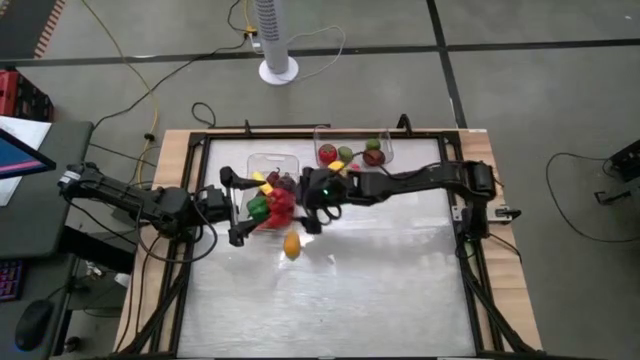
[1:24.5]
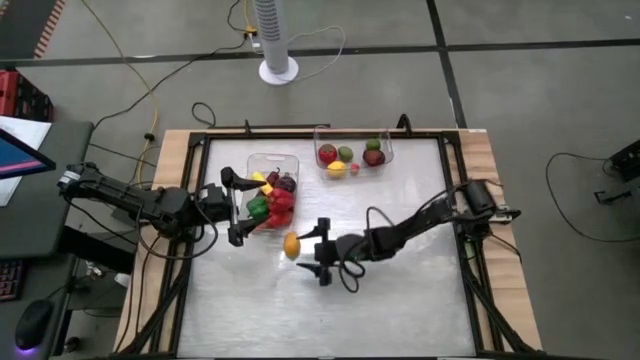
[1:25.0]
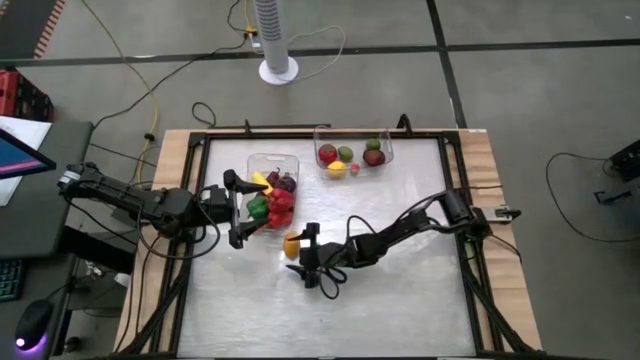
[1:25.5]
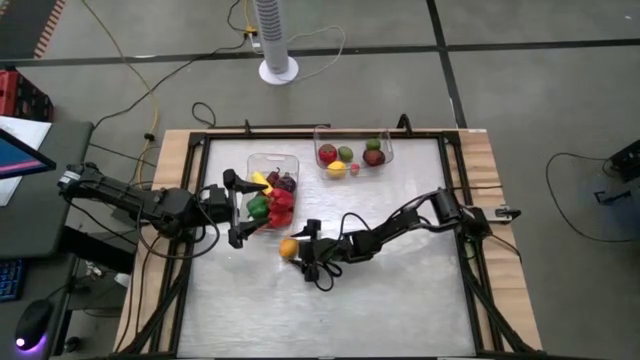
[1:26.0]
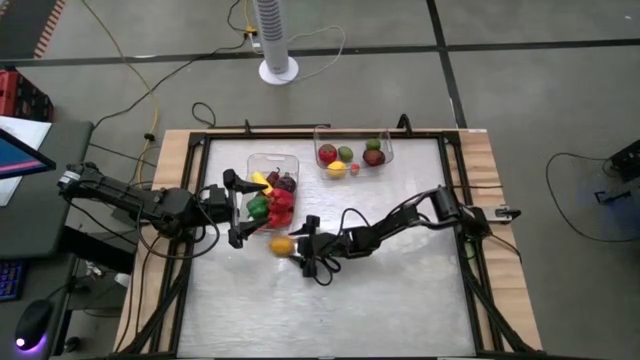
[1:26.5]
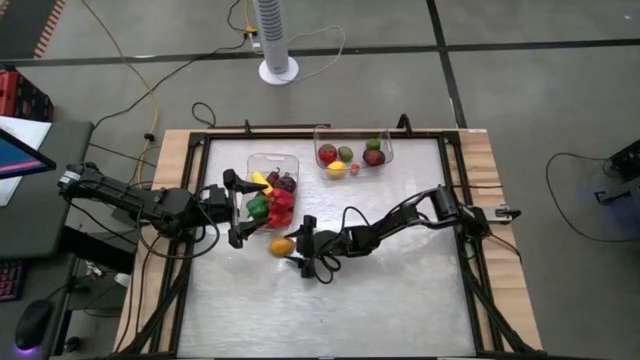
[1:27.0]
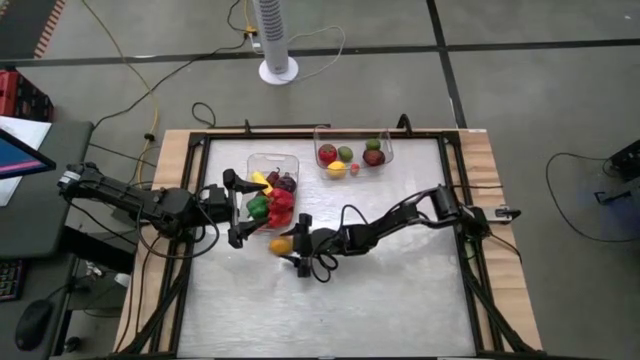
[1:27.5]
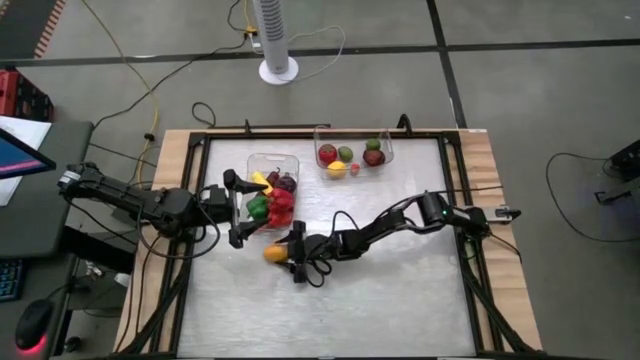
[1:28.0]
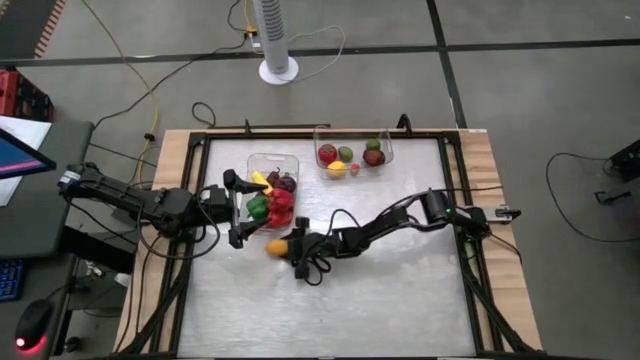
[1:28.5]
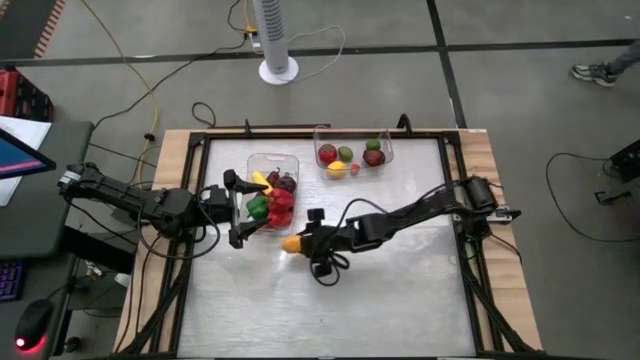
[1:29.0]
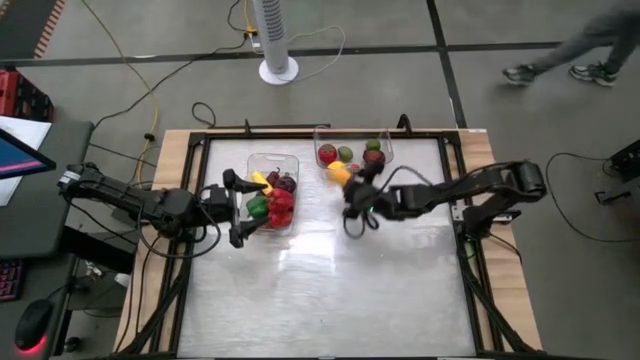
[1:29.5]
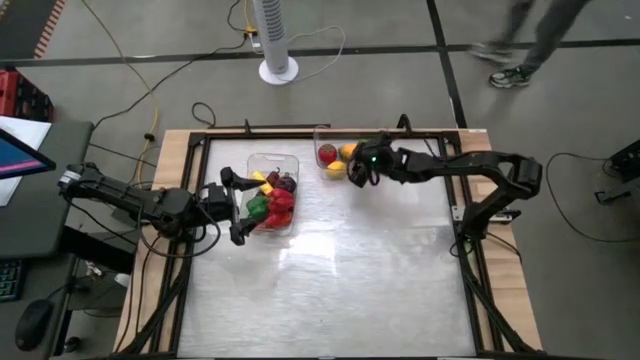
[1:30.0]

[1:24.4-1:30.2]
Task: Sort produce into baskets
Put the yellow lemon into the top transparent bin

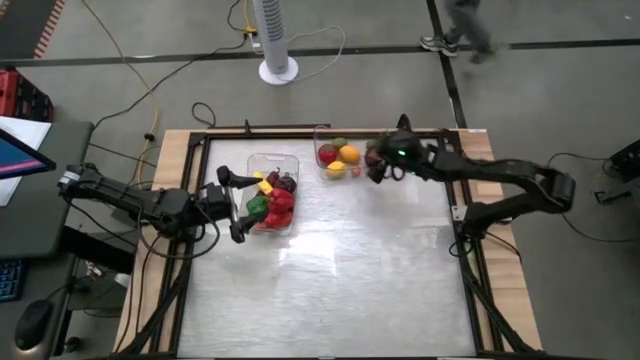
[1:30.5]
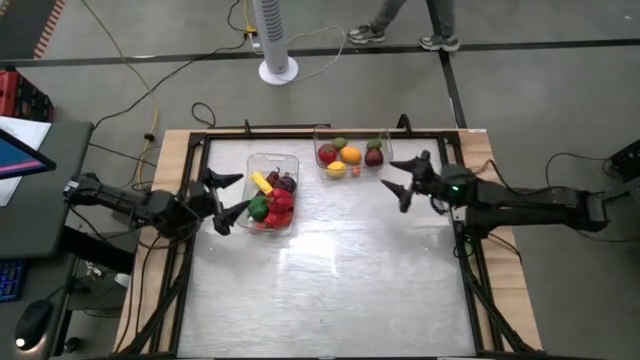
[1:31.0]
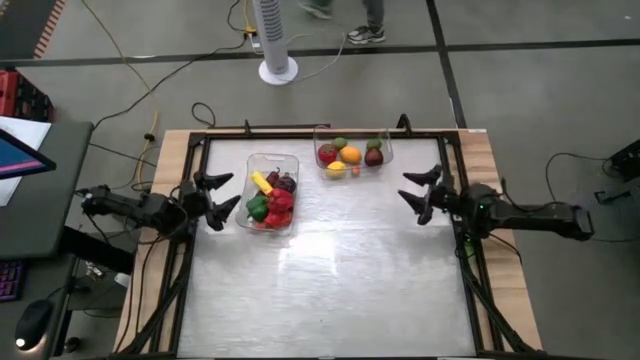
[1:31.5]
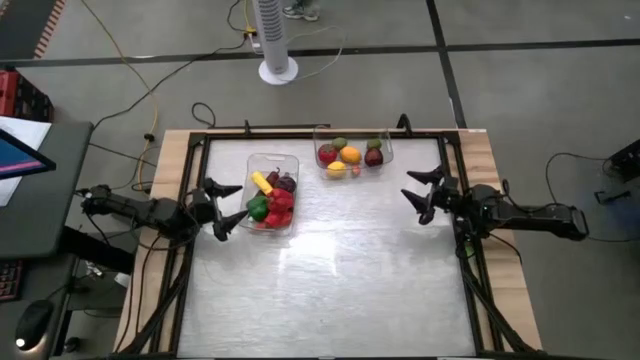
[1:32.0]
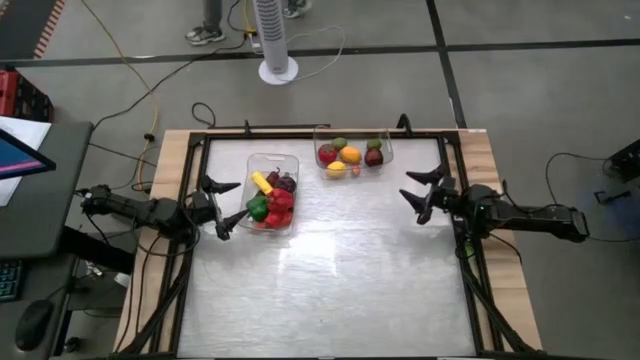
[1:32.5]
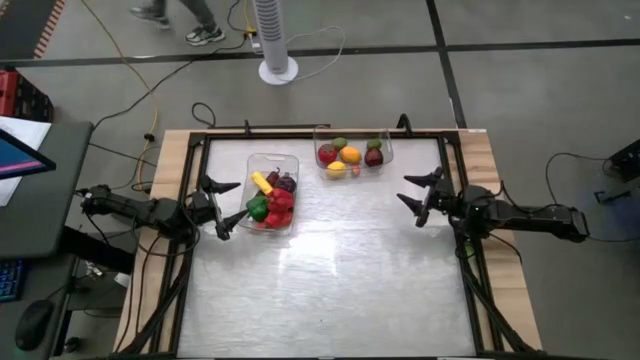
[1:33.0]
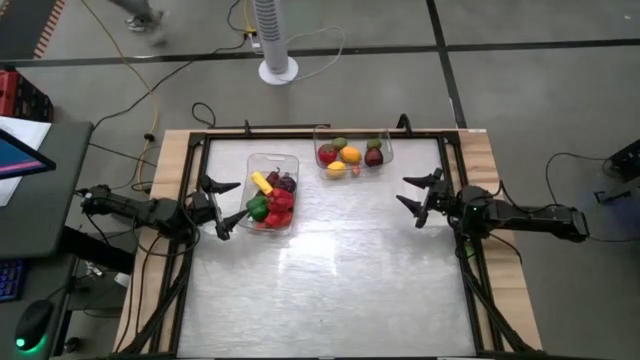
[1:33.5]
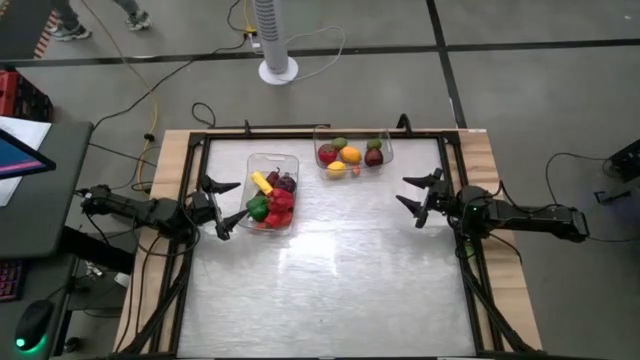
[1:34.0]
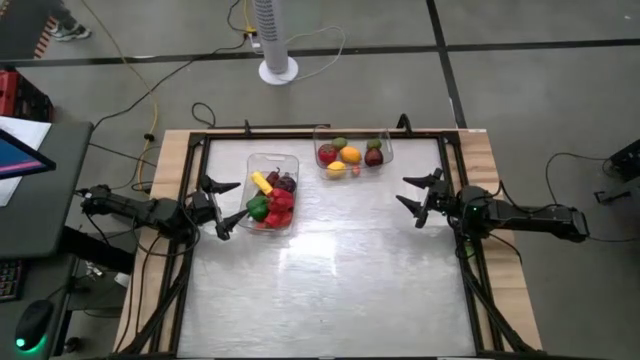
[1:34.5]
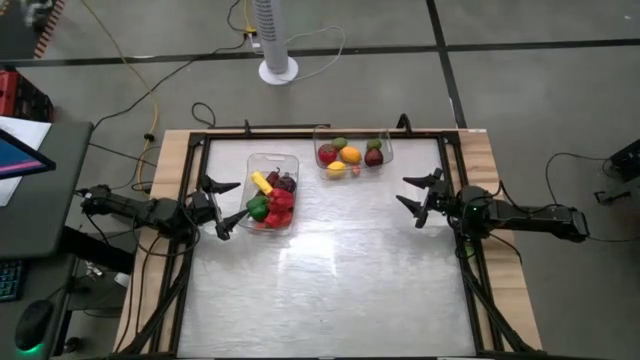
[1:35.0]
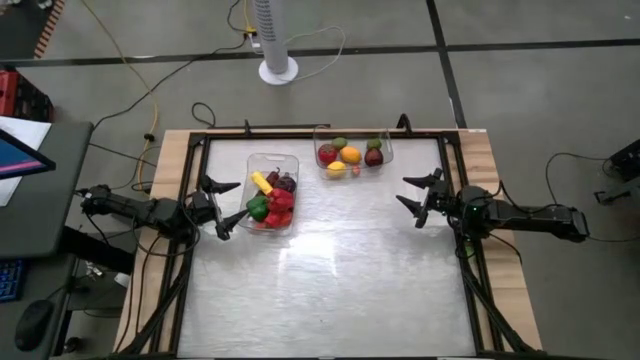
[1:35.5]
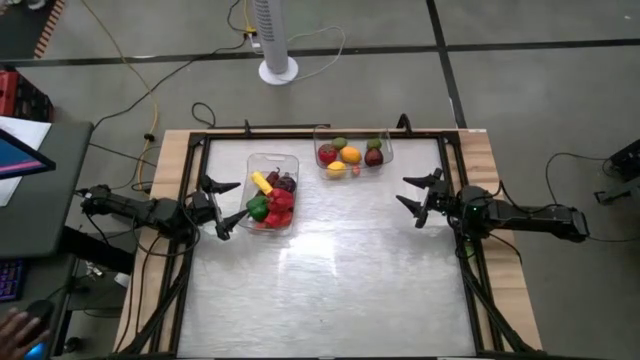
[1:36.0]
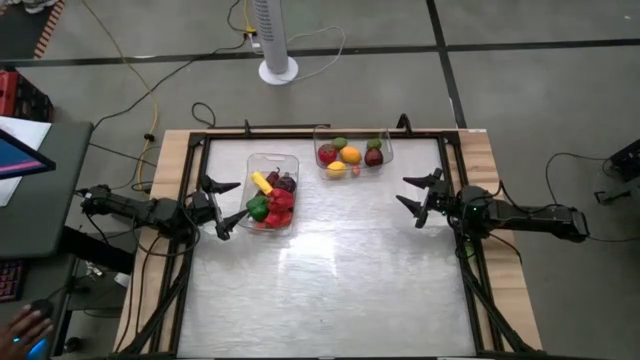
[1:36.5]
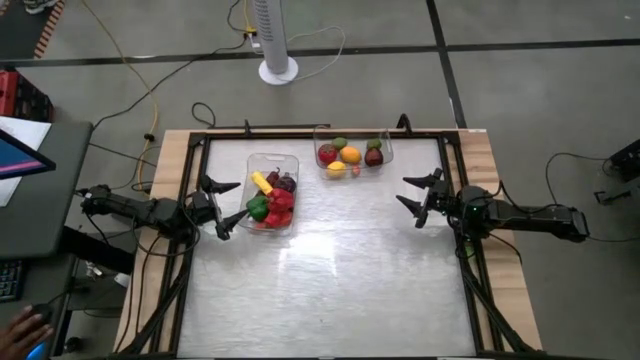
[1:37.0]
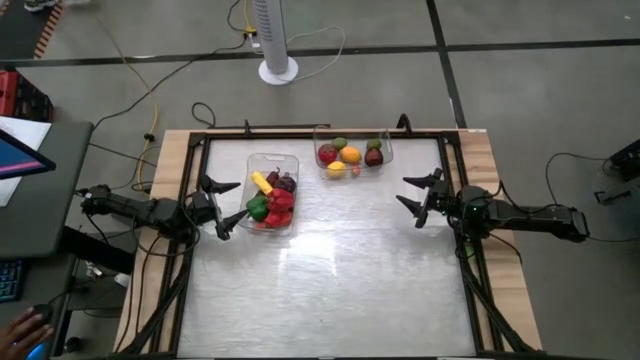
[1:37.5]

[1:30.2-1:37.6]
Return to Home Position

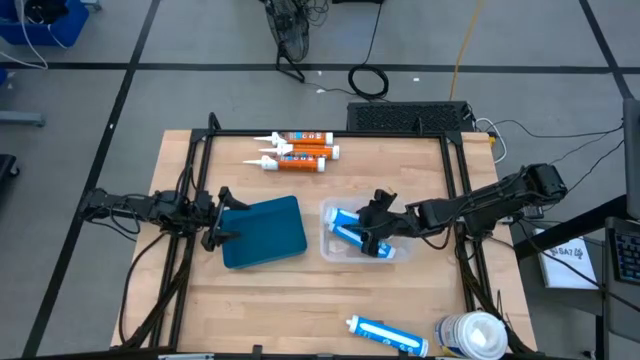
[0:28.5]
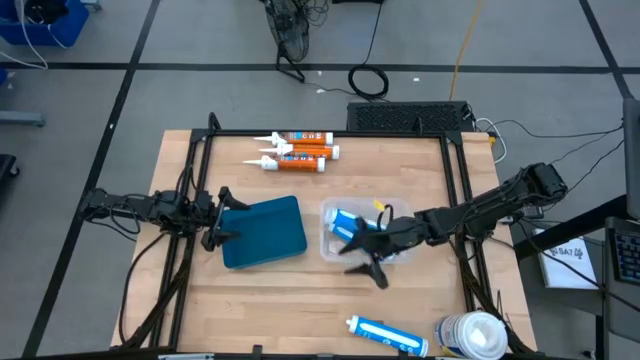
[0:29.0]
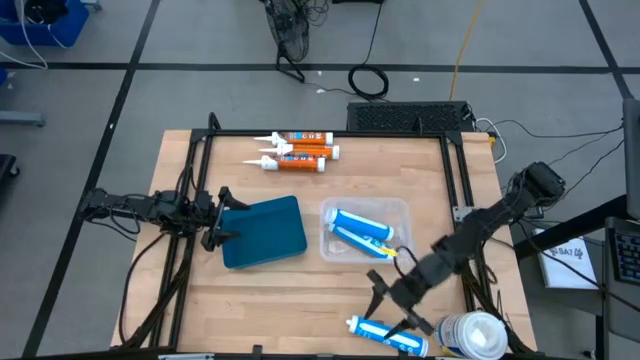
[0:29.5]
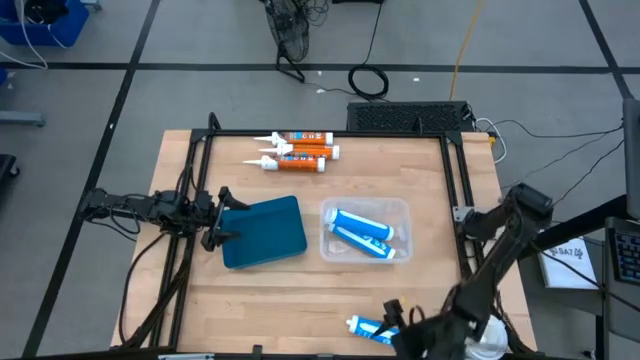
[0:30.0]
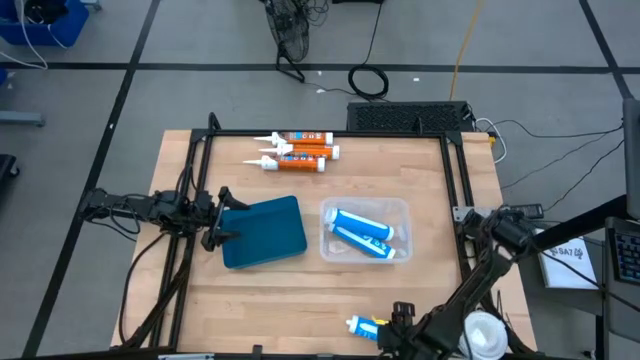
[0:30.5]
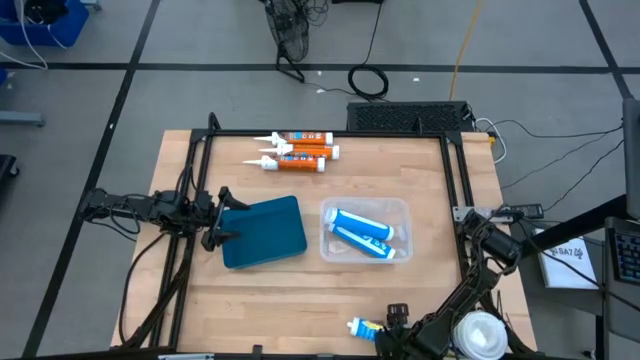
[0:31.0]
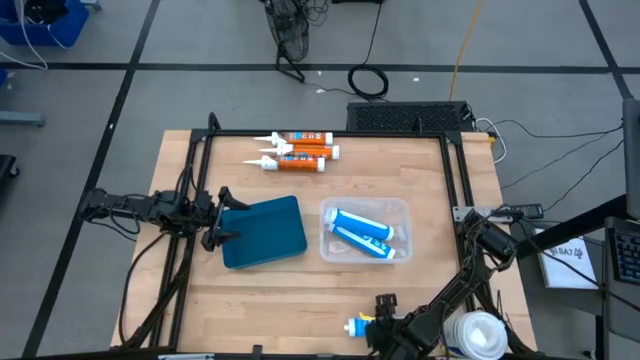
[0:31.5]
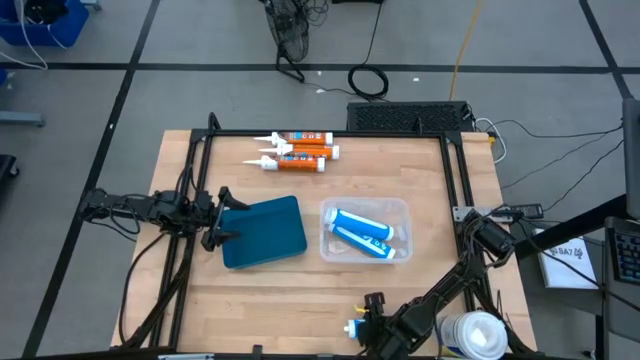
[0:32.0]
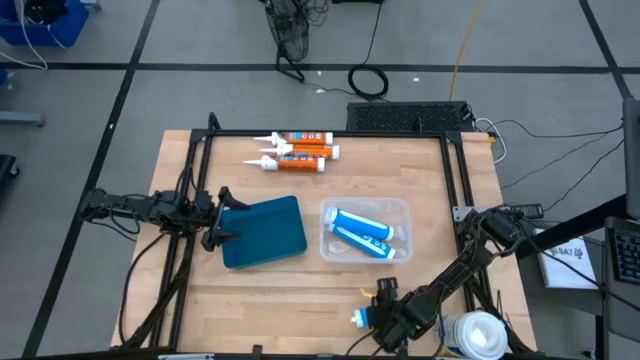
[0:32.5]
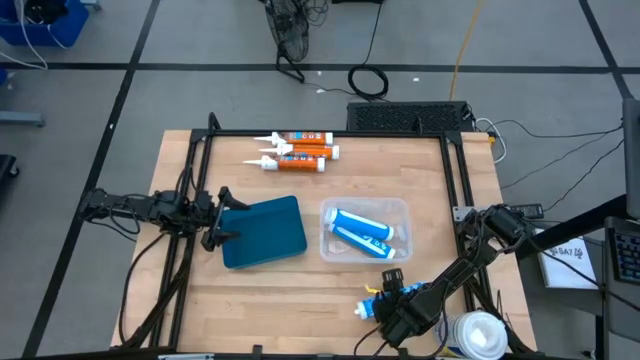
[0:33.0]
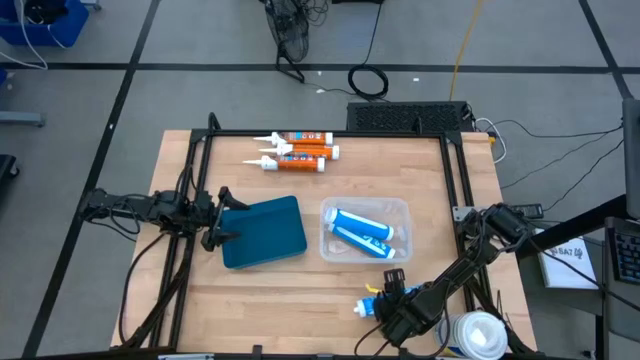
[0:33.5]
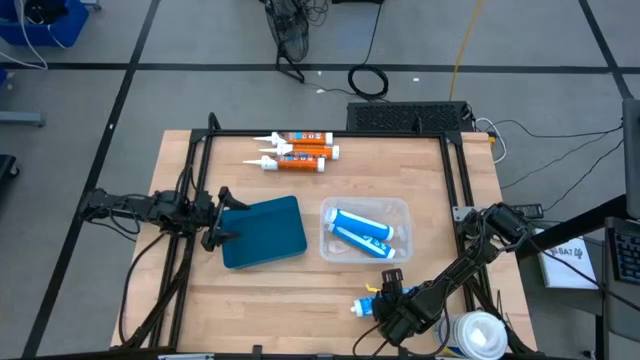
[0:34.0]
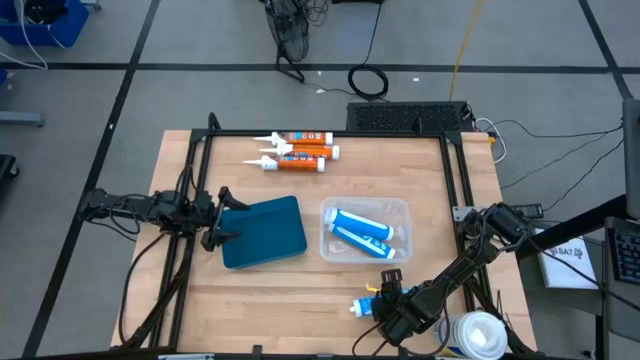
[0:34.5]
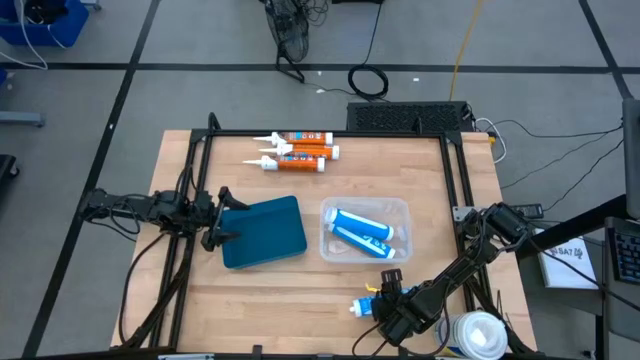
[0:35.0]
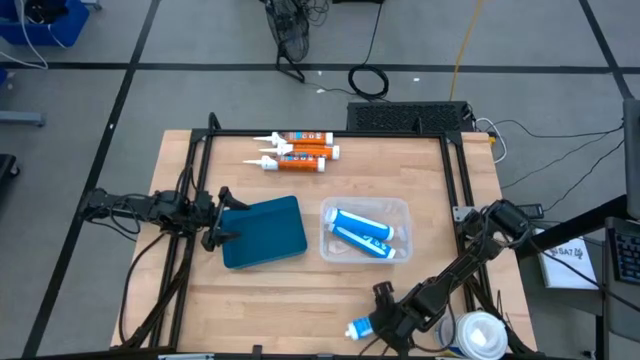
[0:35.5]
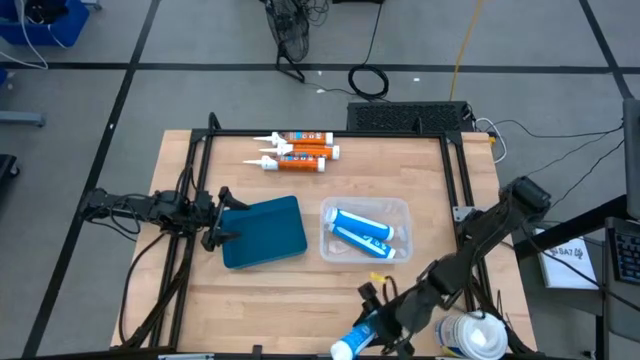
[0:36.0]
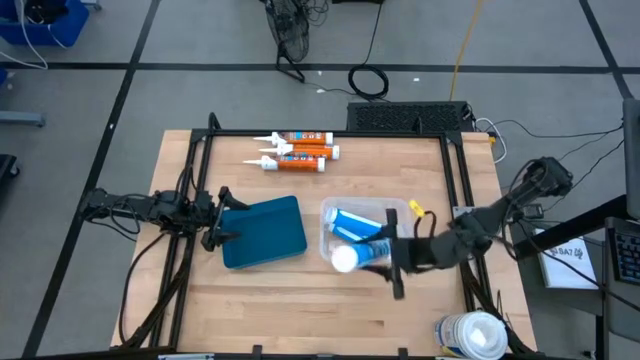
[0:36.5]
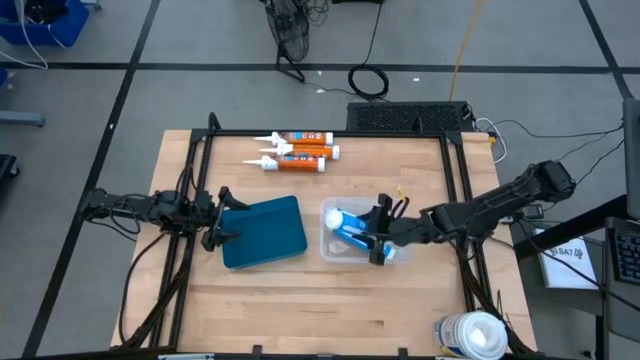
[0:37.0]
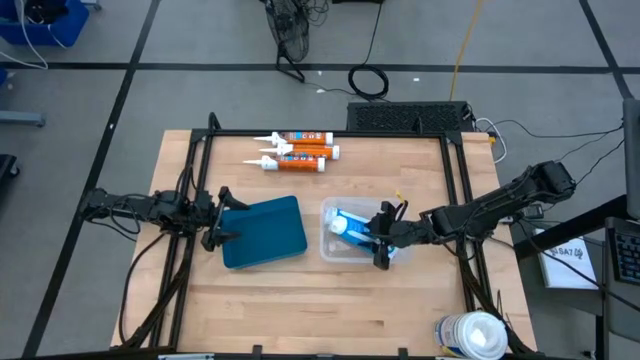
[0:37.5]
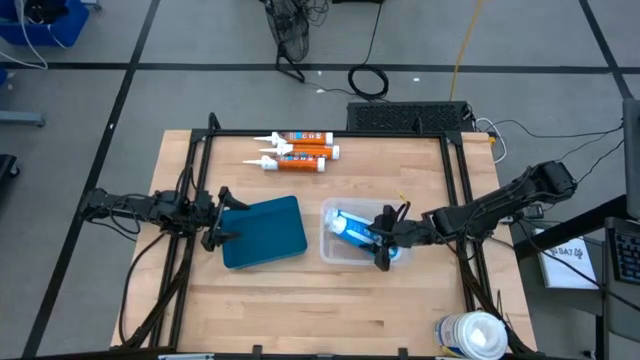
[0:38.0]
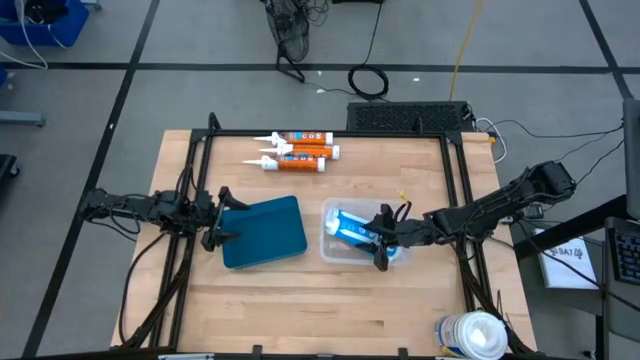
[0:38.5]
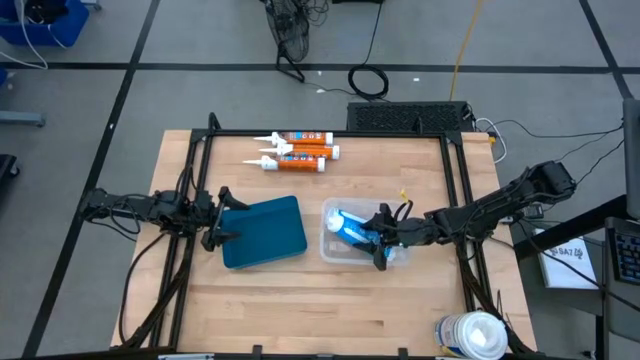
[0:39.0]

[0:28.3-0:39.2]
Task: Pick & place silicon tubes, Sealant and Lysol wipes
Put the blue sealant bottle into the transparent bin
